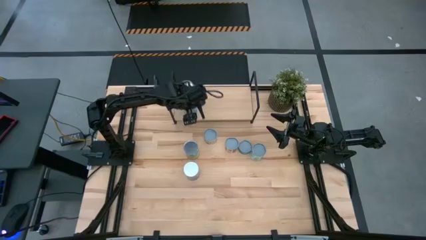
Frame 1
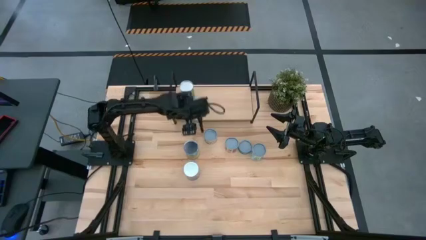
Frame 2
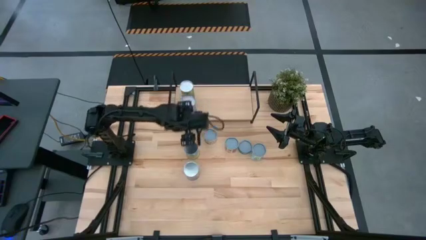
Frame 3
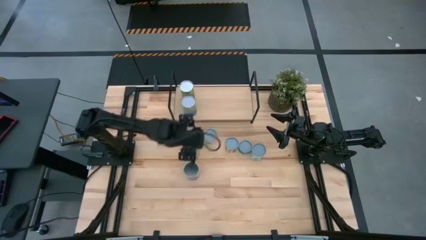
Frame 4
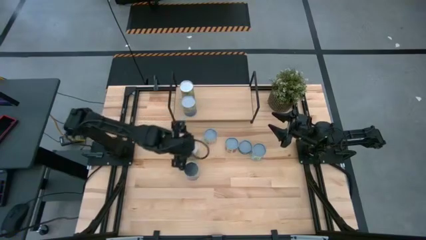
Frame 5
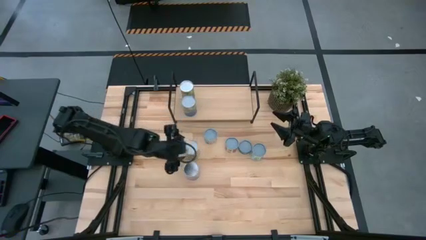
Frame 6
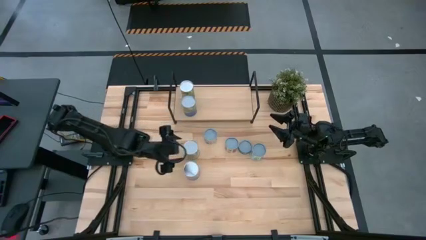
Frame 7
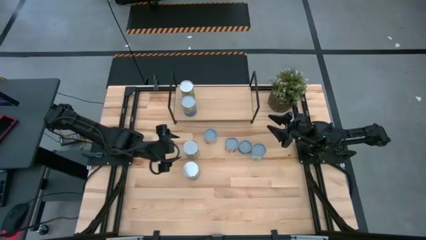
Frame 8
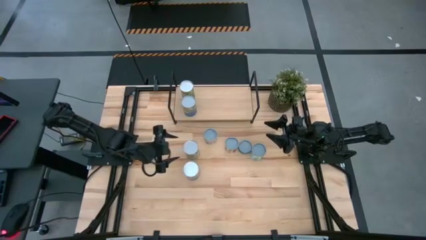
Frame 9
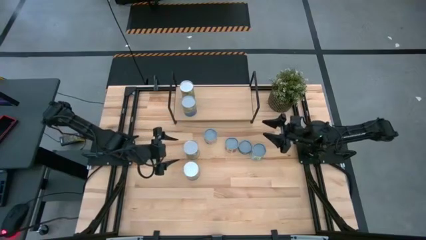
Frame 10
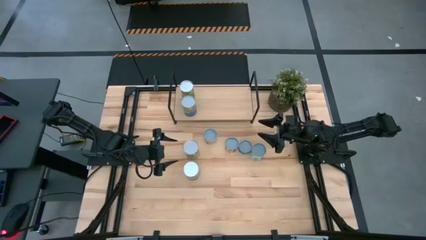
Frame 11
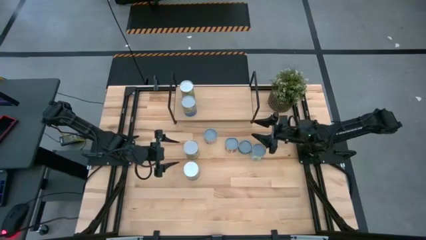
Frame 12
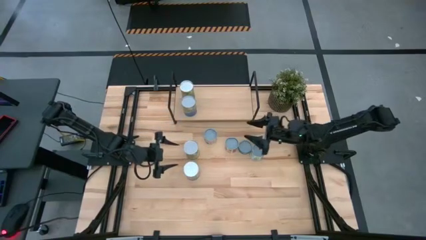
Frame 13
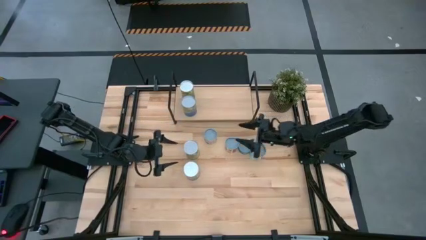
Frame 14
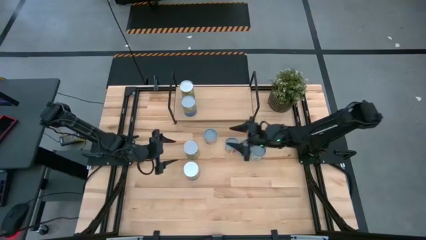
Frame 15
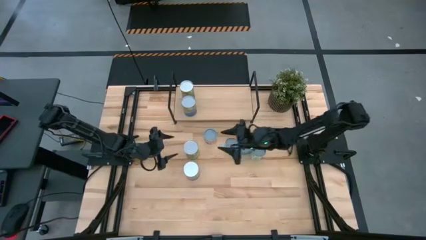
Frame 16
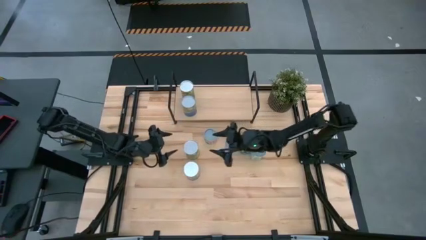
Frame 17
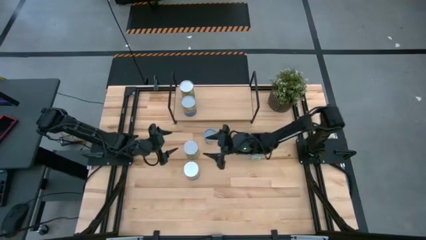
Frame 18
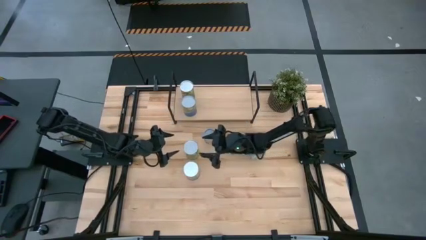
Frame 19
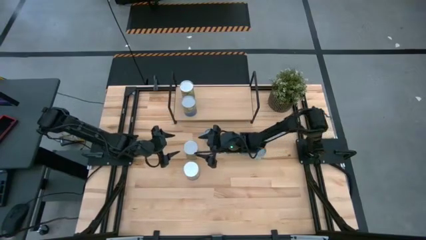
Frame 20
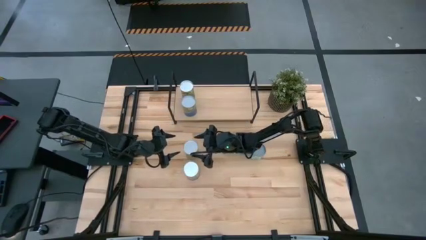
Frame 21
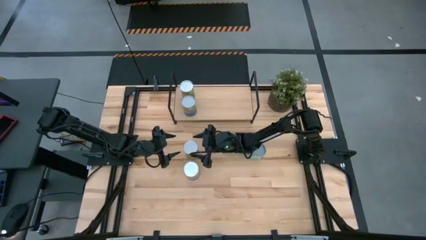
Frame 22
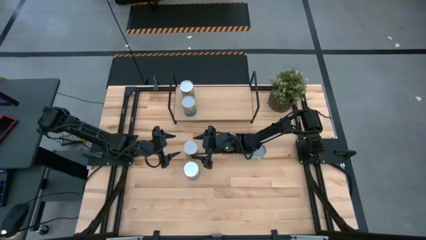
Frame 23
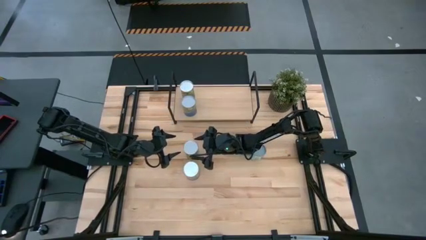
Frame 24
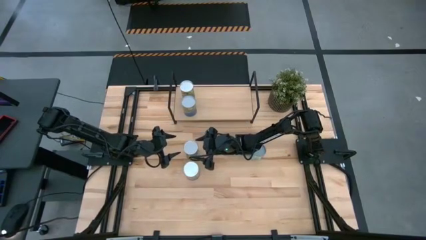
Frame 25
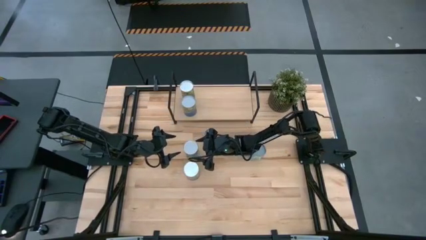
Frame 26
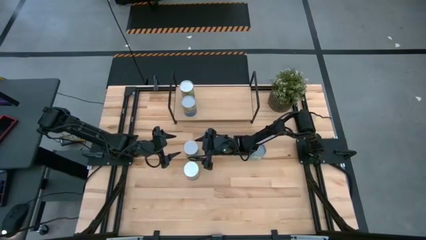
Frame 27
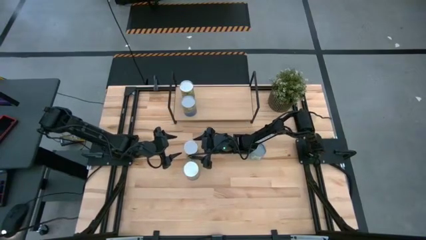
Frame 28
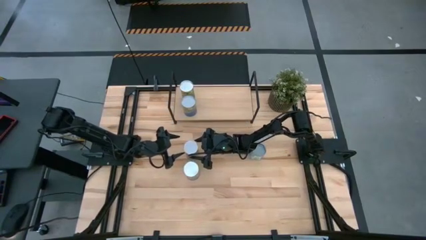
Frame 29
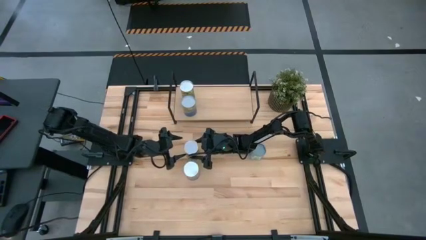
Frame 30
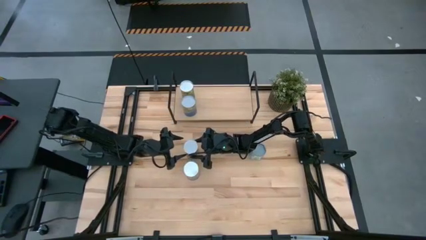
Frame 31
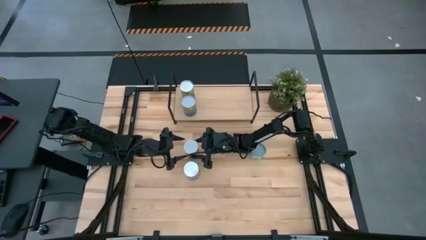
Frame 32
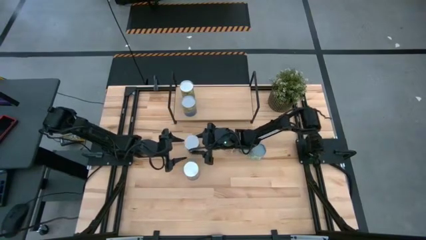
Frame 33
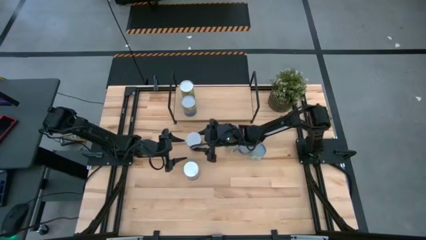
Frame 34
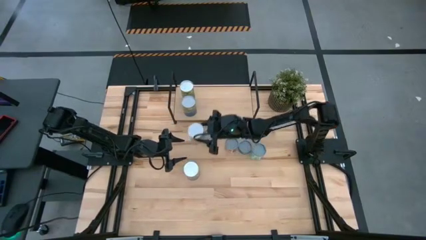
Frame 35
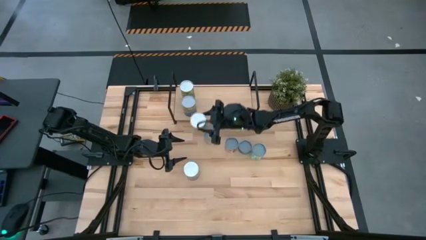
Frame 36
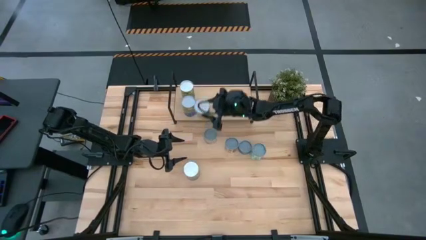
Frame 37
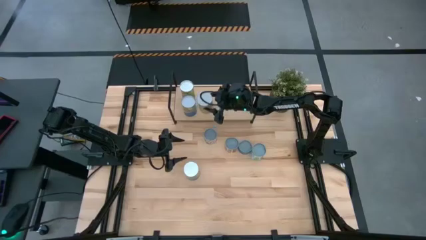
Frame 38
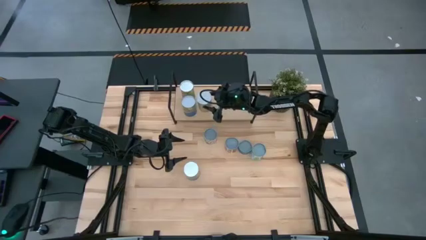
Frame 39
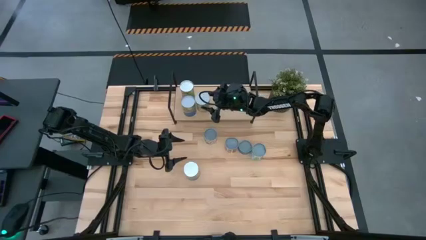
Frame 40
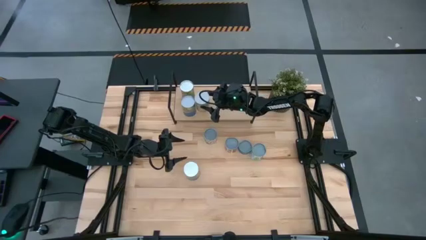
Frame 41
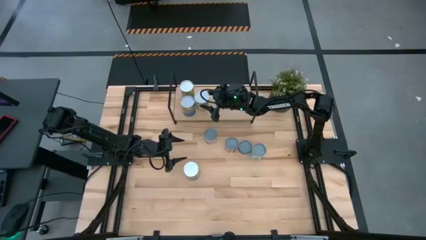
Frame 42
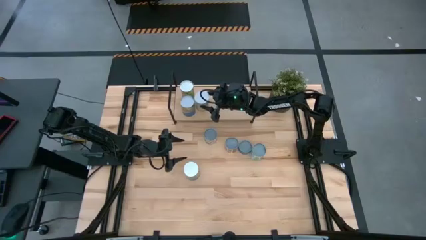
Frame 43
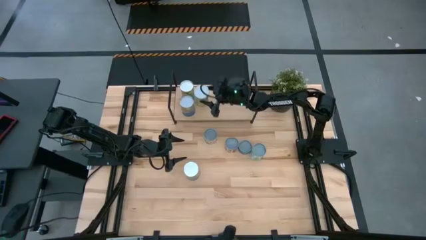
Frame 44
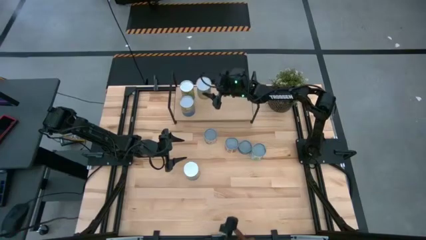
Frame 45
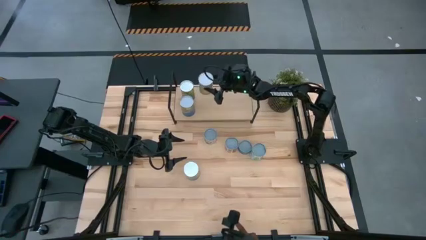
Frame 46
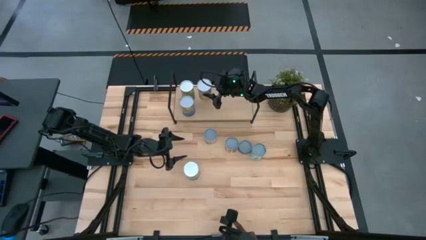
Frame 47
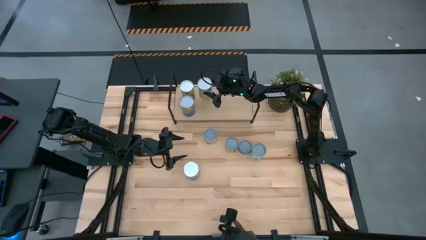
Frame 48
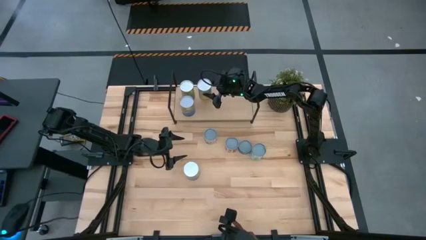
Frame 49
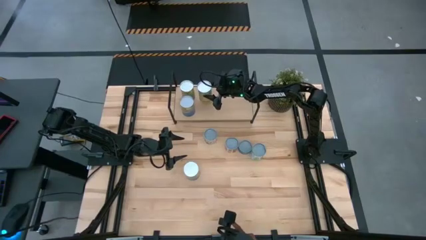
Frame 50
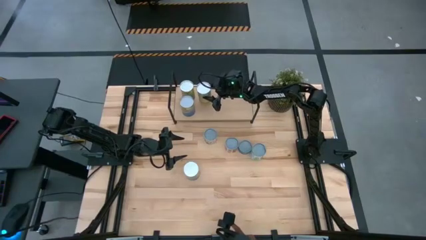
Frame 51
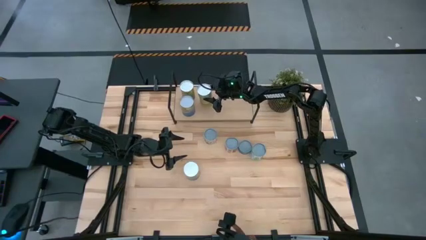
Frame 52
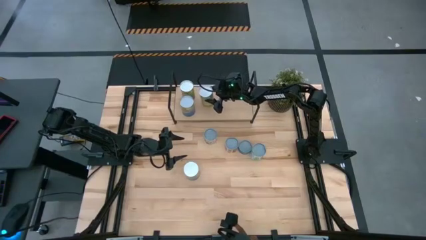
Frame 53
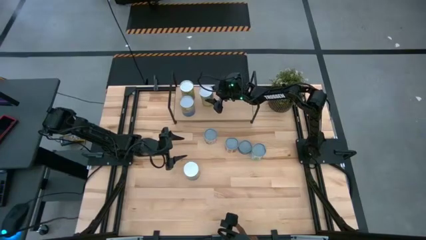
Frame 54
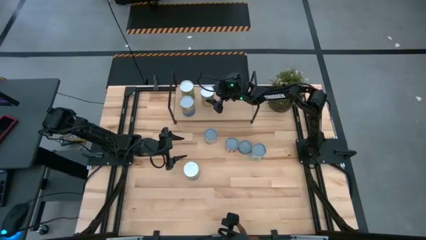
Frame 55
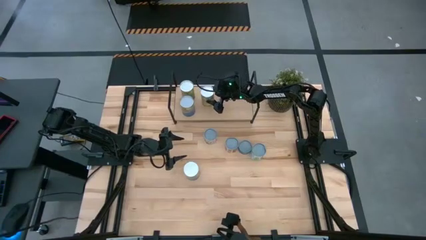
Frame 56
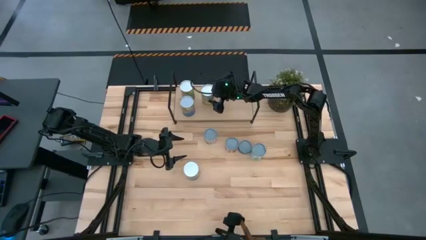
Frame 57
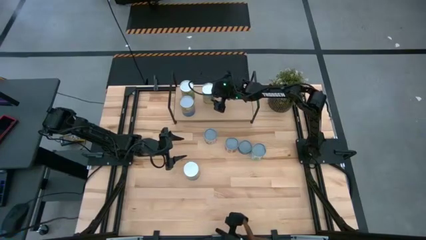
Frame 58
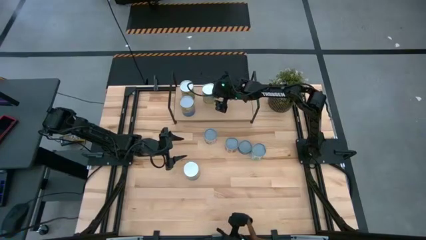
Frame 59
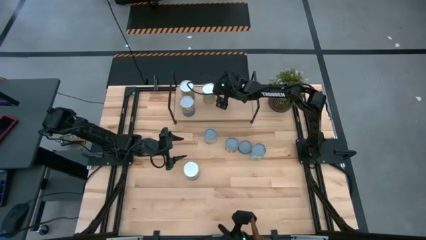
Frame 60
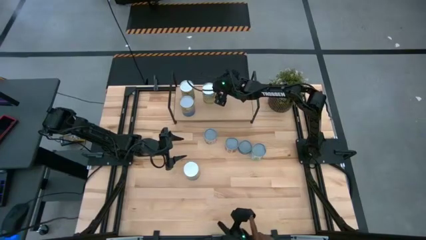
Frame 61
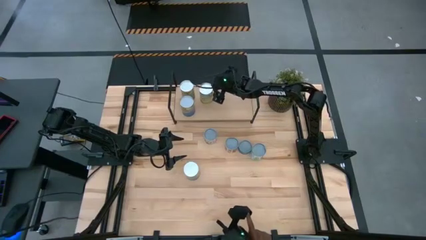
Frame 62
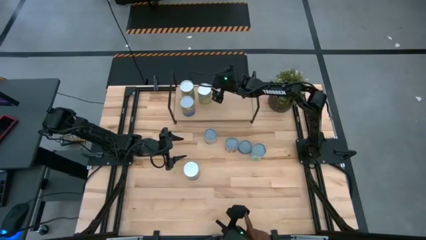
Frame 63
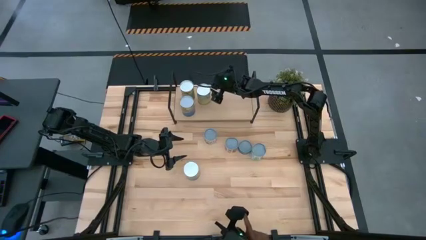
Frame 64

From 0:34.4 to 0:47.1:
Task: Pick and place cans onto a shelf
Put the canned carrots on the shelf

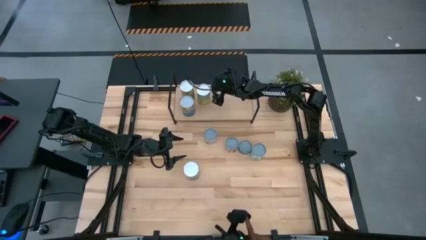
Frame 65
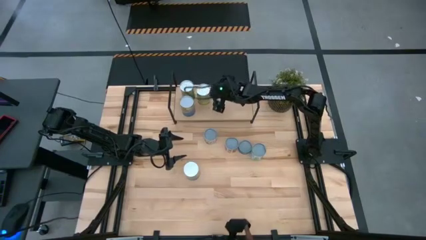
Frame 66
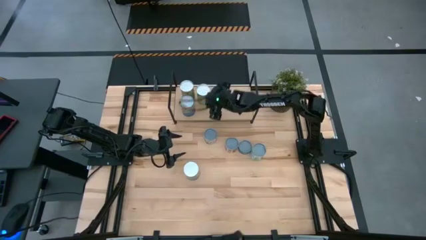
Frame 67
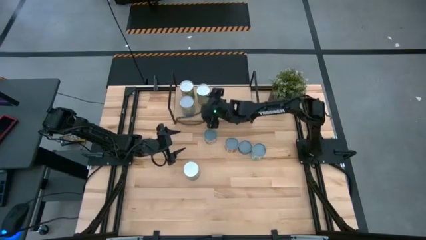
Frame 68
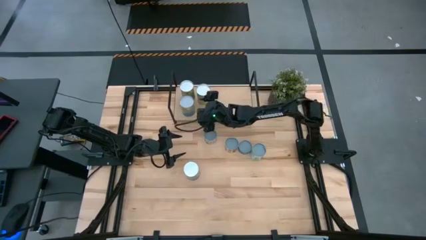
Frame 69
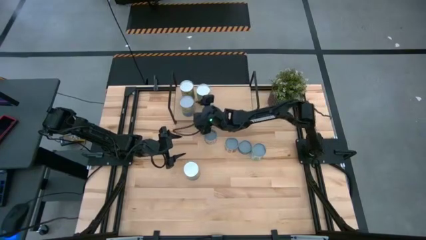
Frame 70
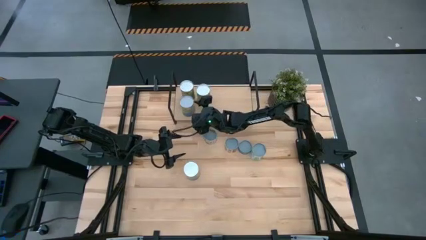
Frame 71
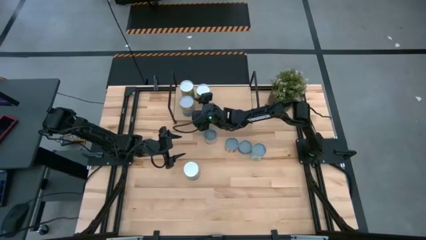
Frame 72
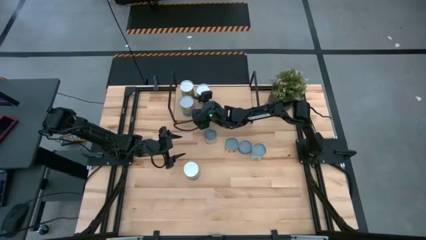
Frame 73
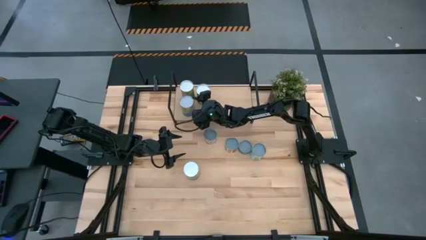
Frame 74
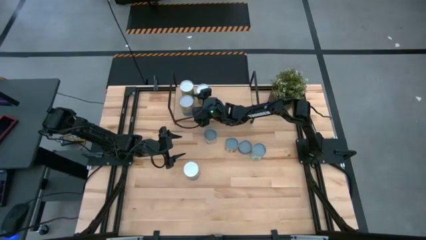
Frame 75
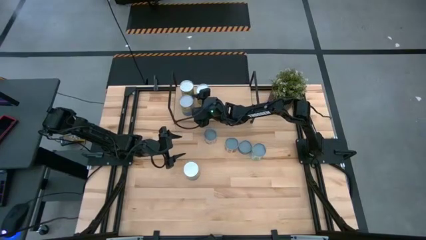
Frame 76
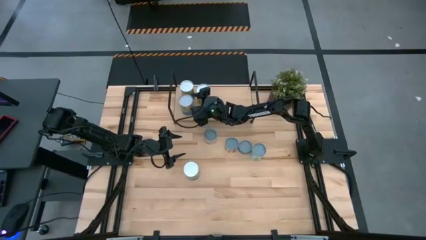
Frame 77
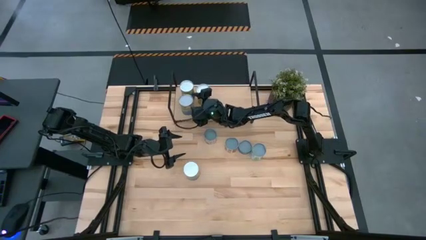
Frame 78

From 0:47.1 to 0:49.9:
Adjust the canned peas on the shelf

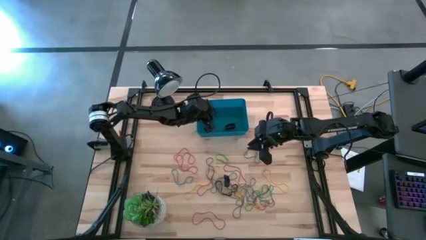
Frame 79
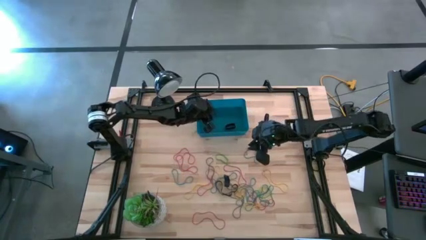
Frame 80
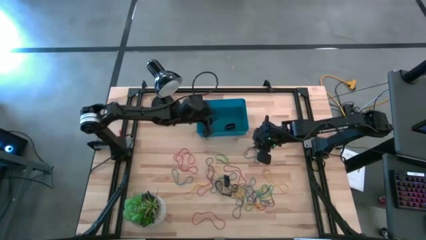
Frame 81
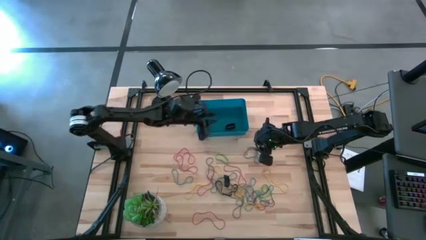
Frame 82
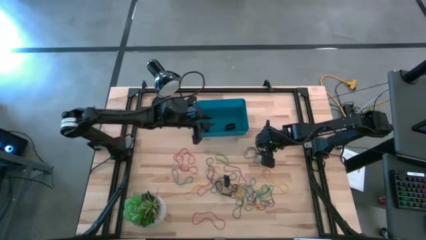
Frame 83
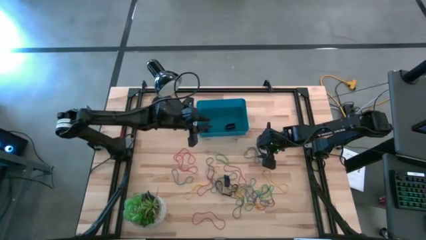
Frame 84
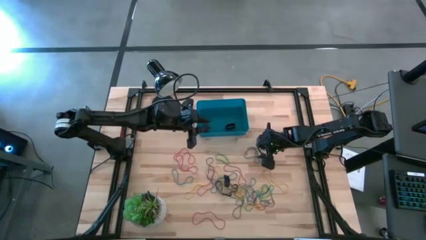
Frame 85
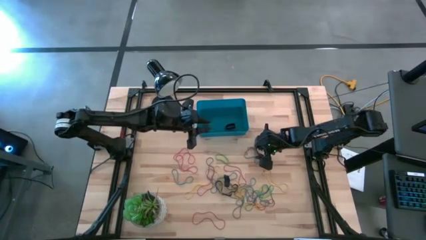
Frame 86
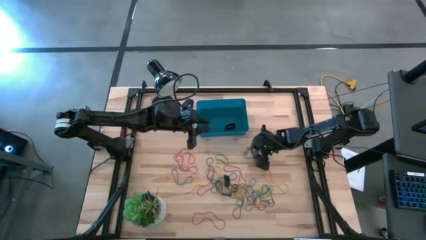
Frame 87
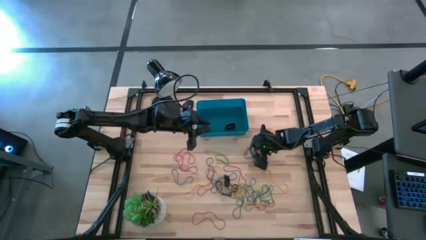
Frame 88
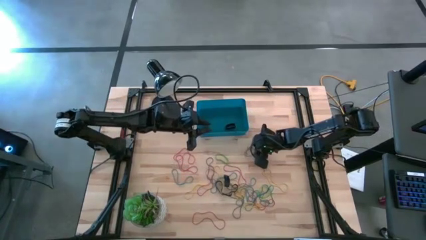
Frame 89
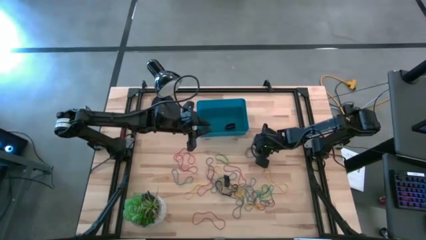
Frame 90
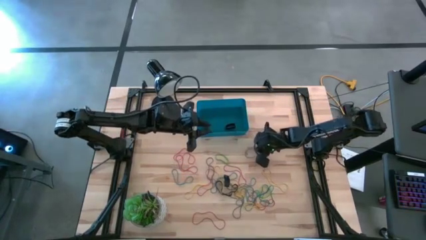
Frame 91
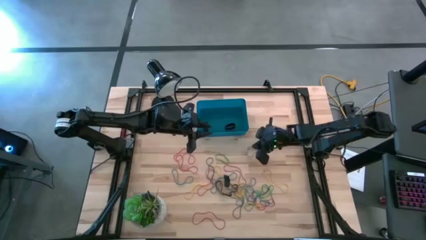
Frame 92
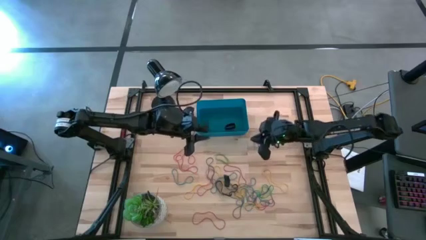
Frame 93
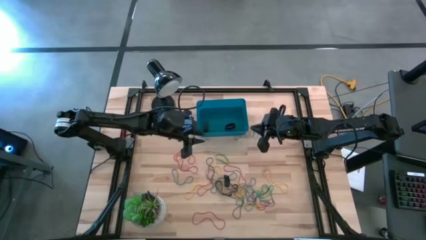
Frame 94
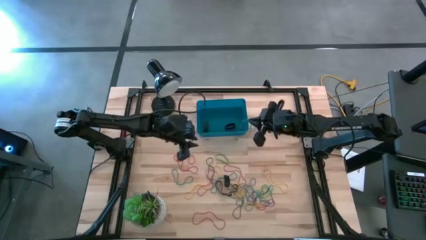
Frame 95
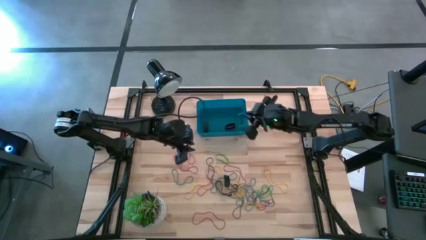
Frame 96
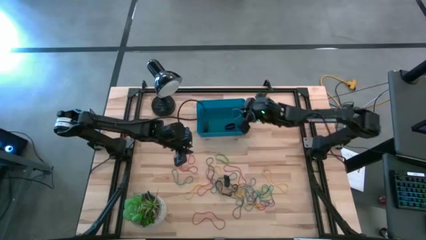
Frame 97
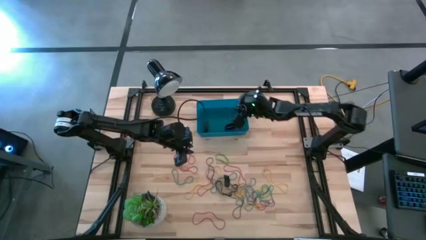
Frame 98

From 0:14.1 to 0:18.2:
Task: Pick and place rubber bands into bin
Put the blue rubber band into the blue bin
